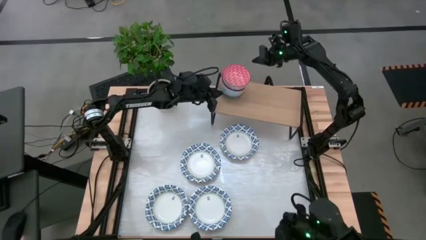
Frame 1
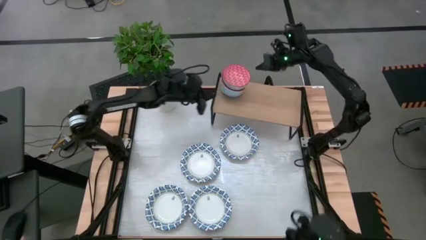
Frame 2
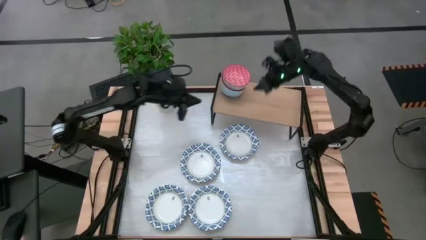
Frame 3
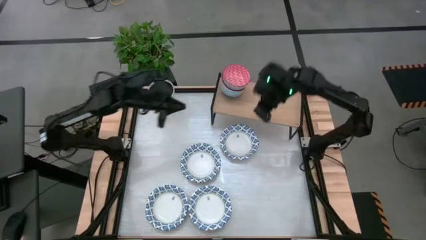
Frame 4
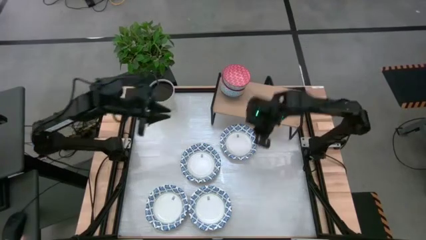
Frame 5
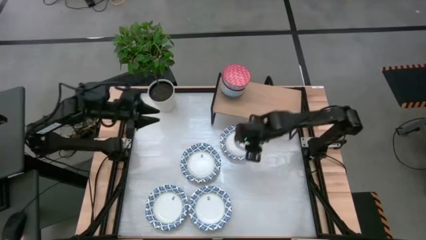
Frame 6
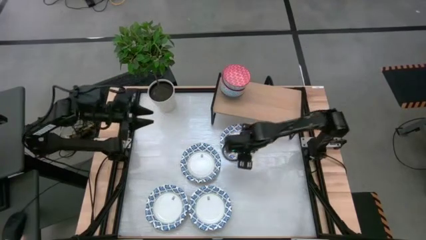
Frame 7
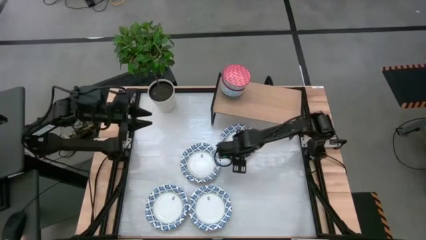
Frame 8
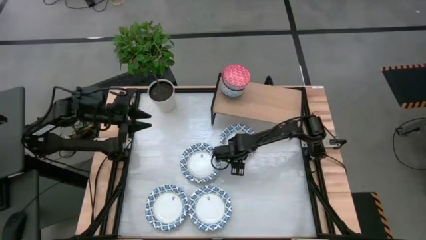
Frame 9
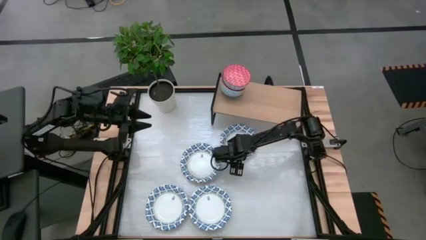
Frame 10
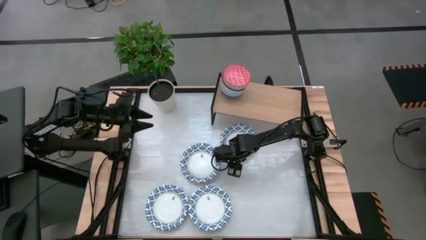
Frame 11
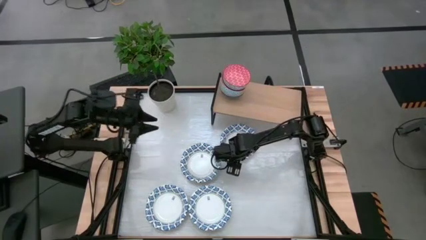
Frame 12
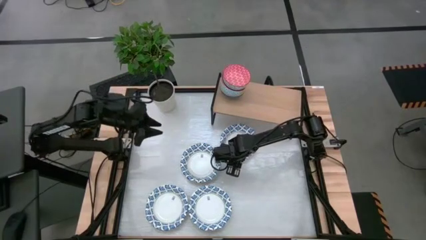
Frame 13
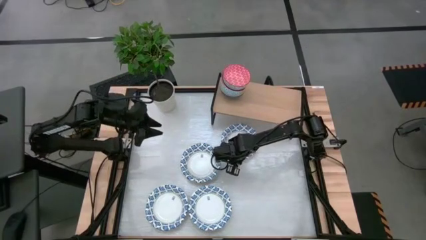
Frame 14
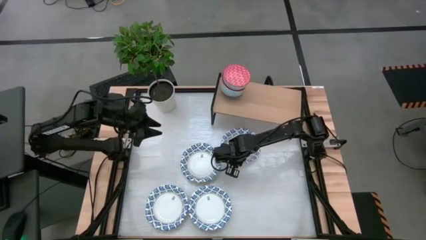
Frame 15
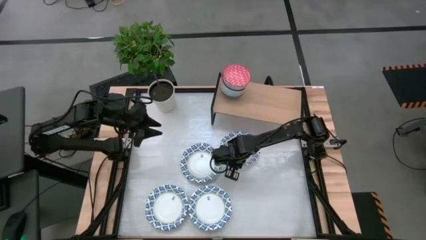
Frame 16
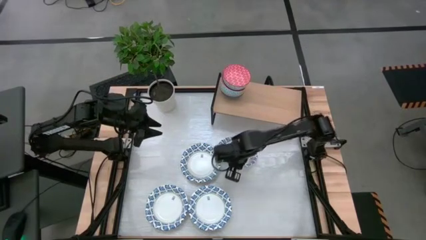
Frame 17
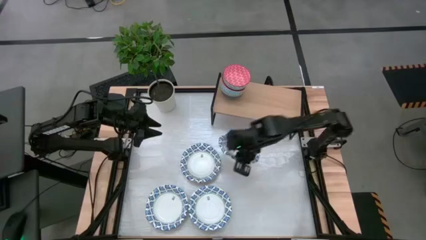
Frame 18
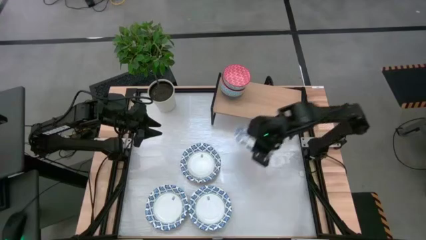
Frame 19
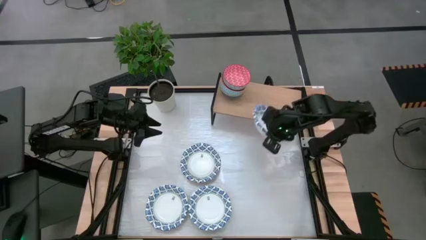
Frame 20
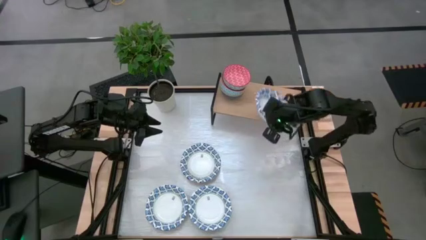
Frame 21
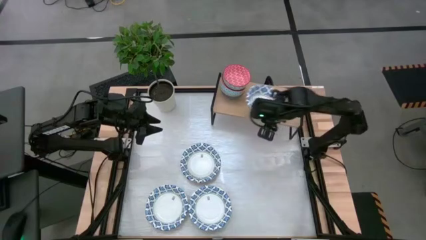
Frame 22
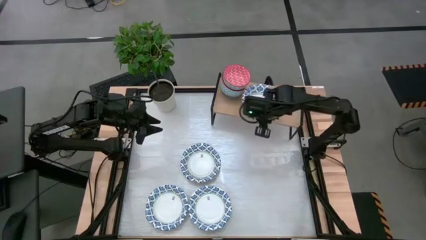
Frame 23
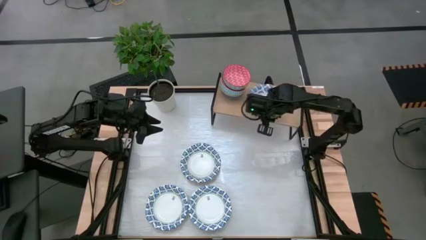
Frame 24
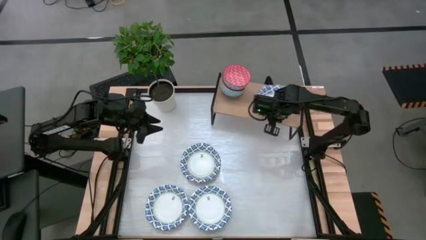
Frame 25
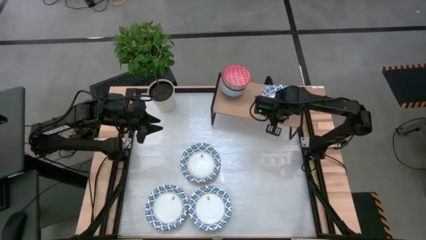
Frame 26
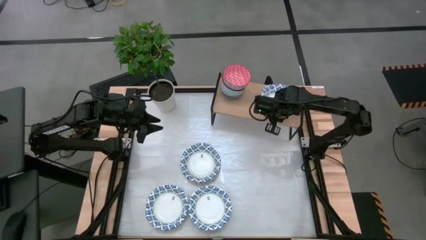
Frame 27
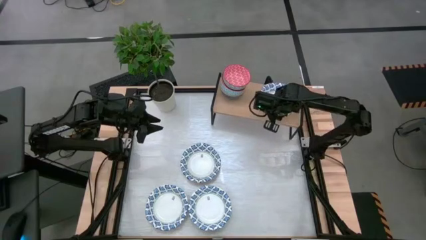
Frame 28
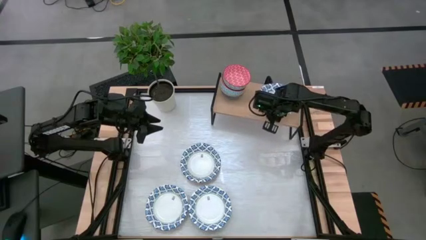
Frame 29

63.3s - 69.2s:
Task: Place and stack bowls onto a shelf
Put the top right white bowl on the shelf

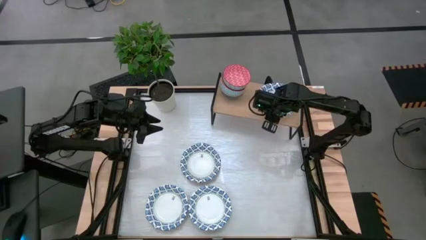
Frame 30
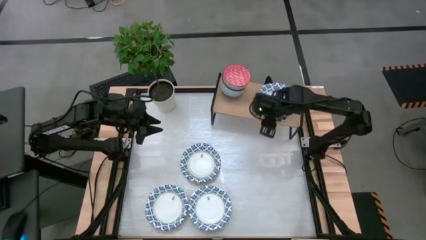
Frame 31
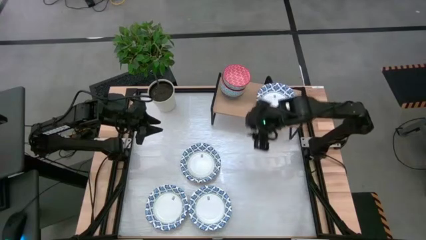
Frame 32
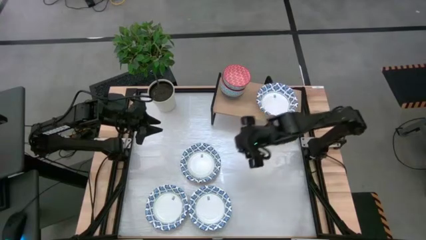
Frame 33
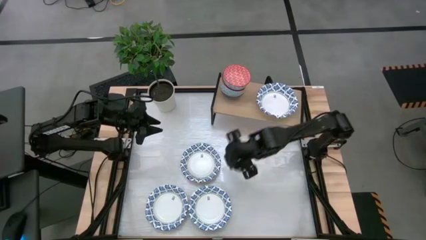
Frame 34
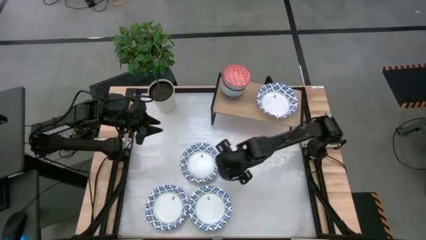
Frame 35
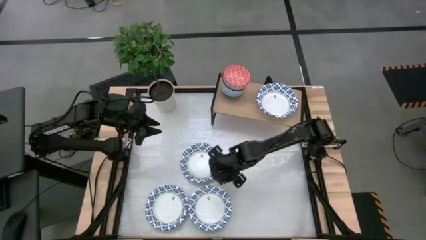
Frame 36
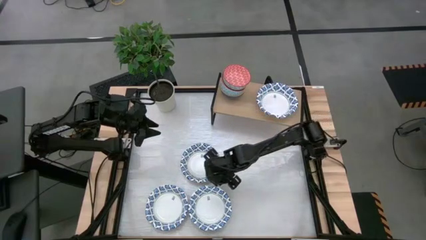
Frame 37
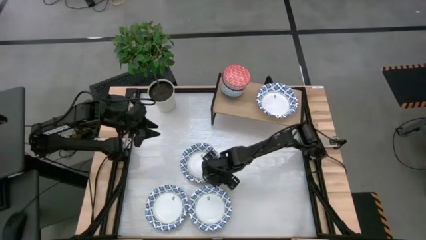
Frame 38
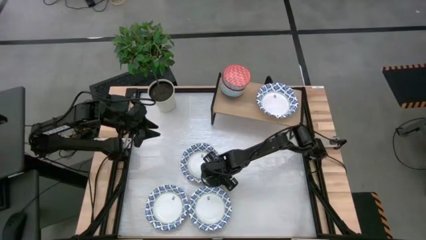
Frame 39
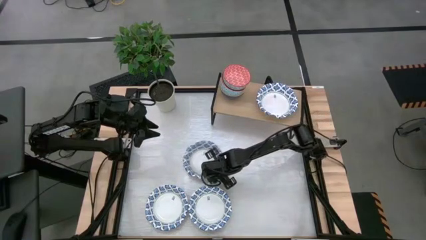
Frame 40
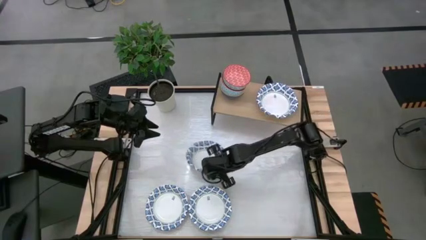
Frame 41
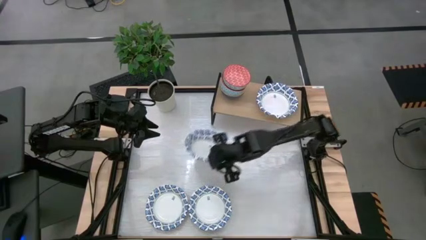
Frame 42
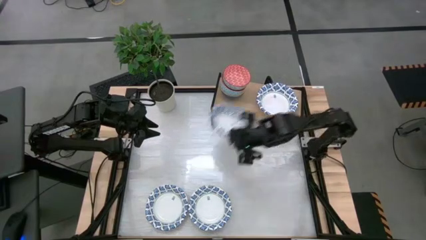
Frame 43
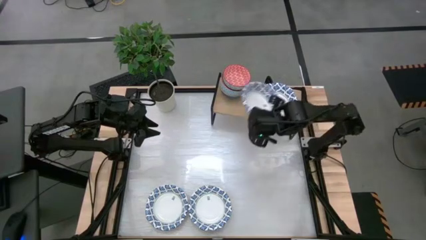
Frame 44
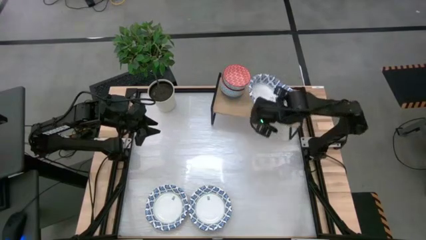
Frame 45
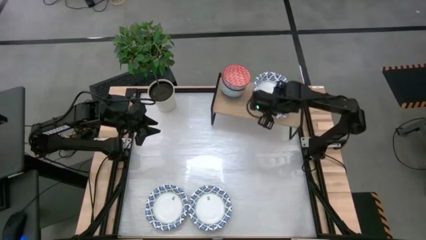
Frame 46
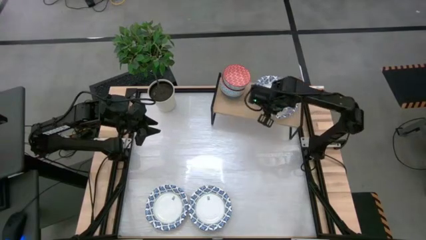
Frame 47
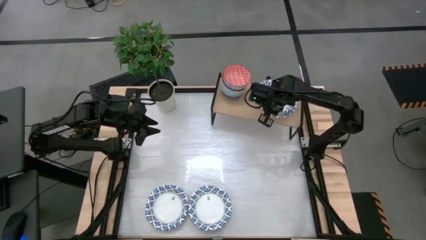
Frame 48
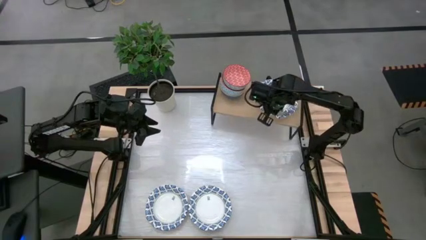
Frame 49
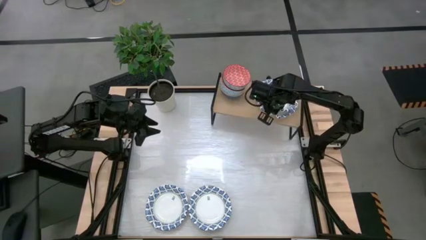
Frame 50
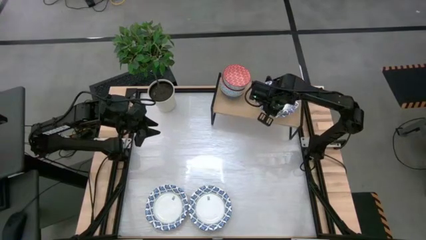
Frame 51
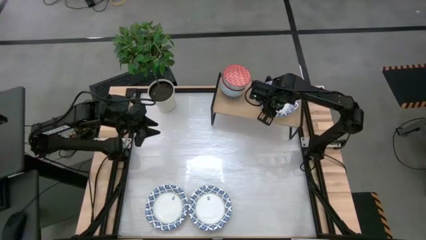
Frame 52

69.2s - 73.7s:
Stack the top white bowl on top of the white bowl on the shelf

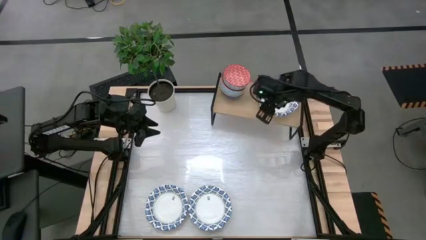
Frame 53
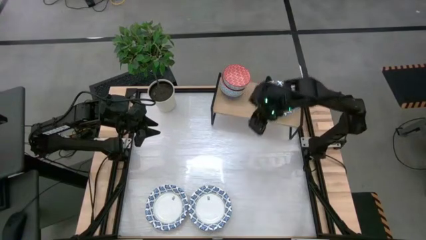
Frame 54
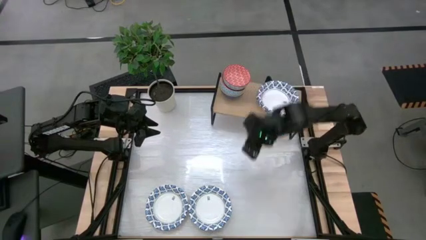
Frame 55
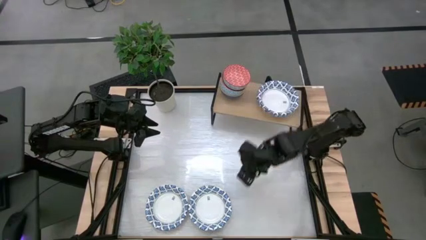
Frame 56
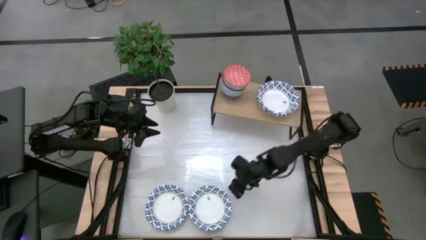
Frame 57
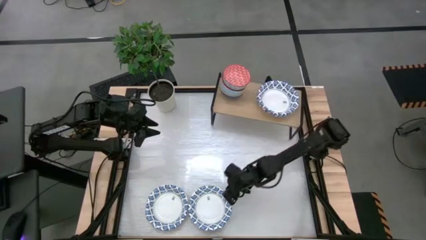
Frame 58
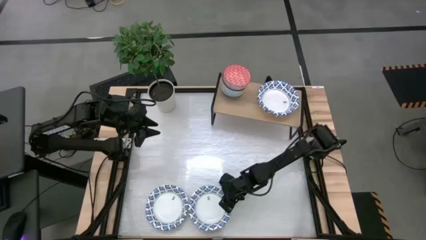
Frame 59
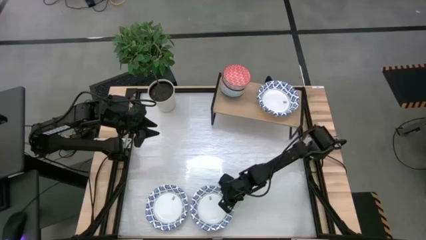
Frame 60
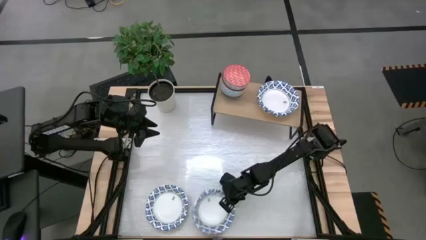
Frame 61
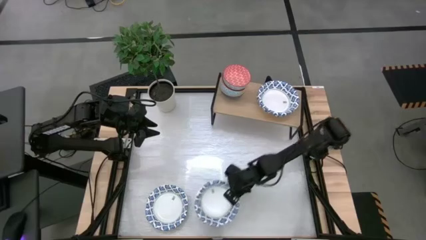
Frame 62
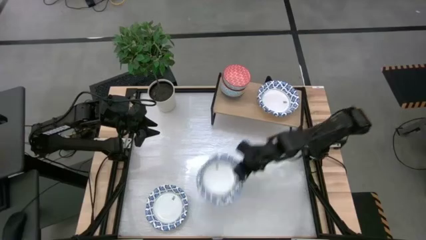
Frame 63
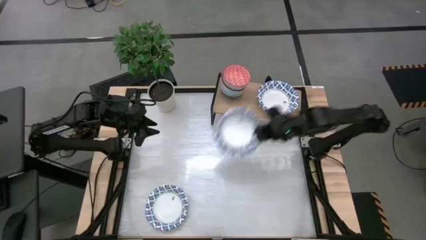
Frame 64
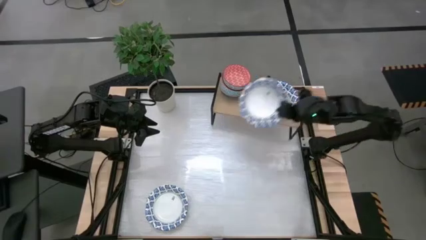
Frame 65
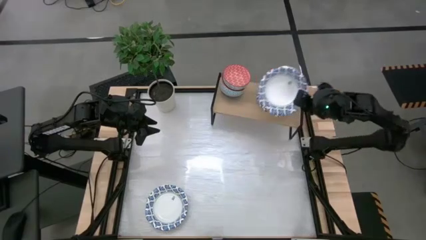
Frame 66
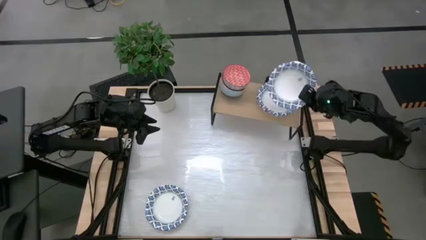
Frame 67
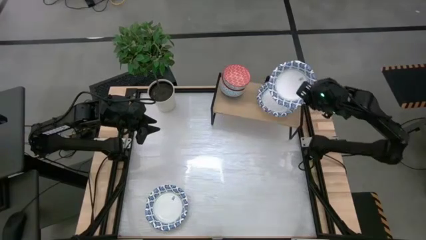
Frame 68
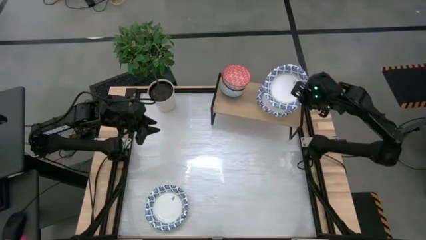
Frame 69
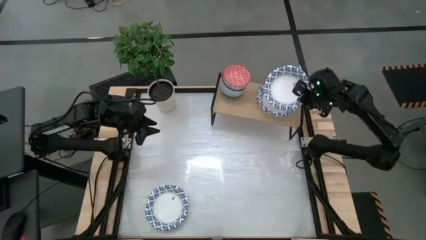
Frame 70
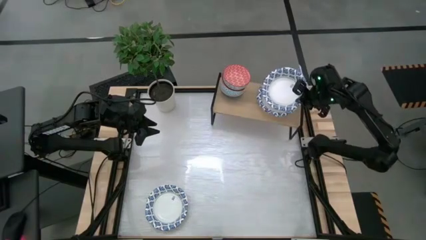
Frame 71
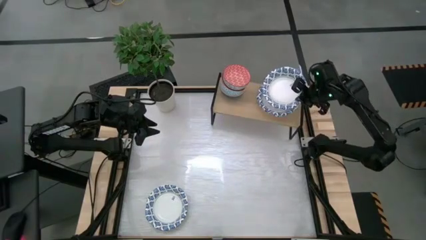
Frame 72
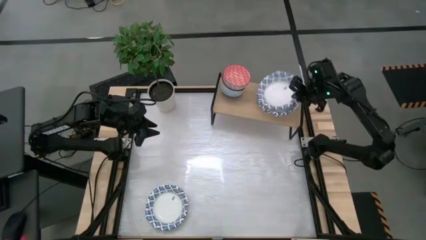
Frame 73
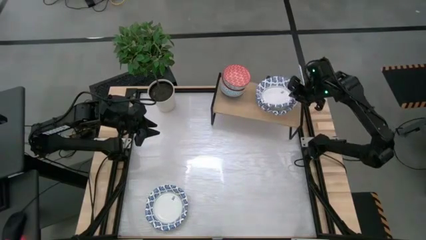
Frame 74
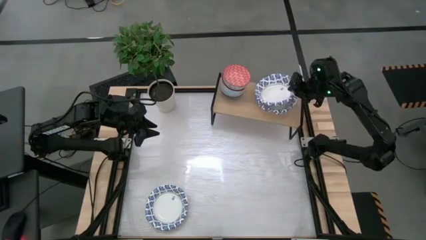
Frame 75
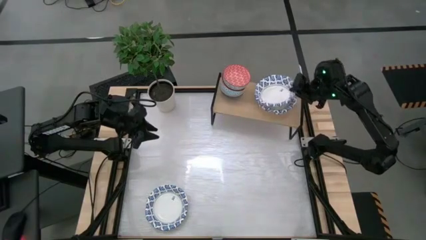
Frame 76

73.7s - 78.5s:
Stack the right white bowl on top of the white bowl on the shelf
